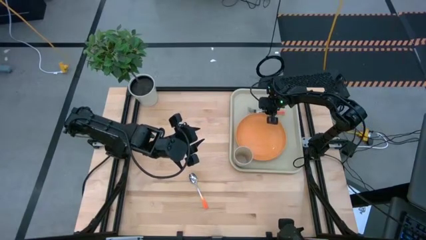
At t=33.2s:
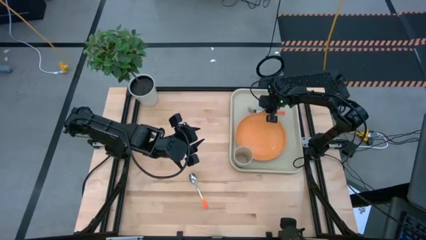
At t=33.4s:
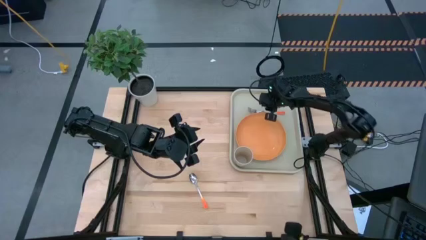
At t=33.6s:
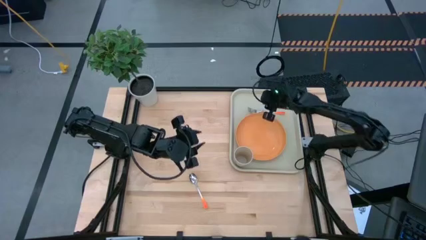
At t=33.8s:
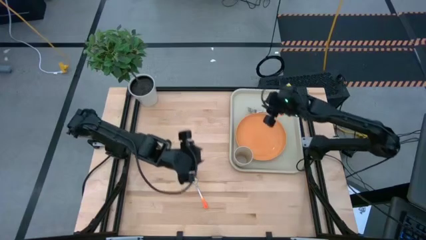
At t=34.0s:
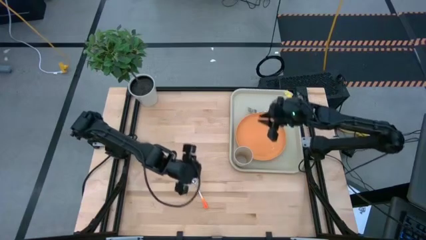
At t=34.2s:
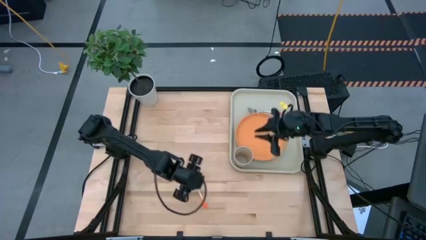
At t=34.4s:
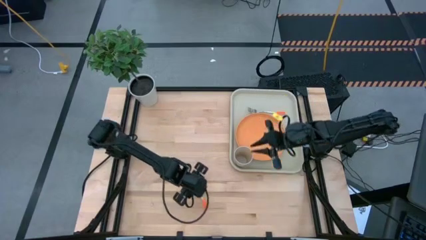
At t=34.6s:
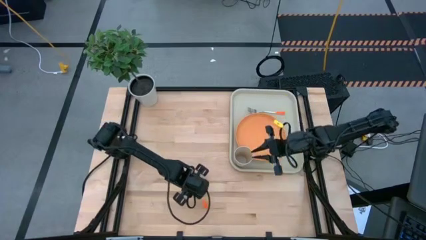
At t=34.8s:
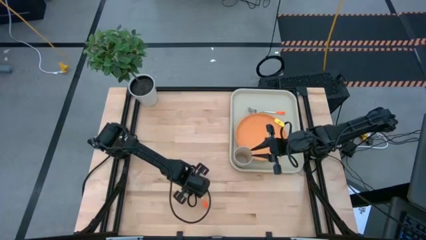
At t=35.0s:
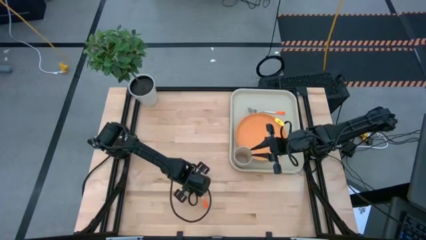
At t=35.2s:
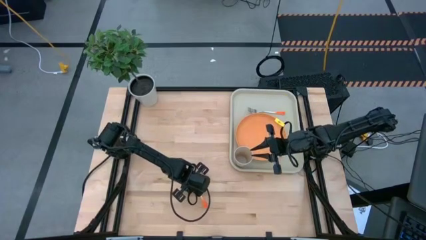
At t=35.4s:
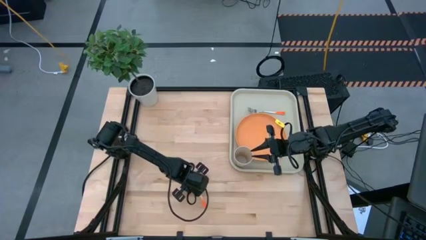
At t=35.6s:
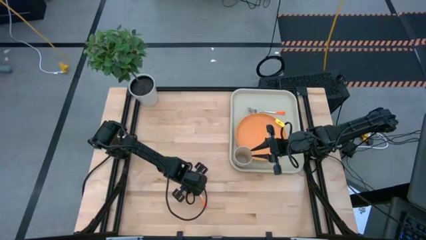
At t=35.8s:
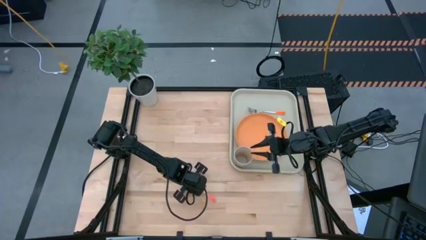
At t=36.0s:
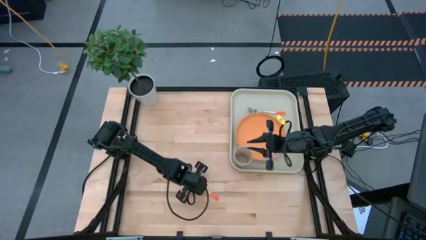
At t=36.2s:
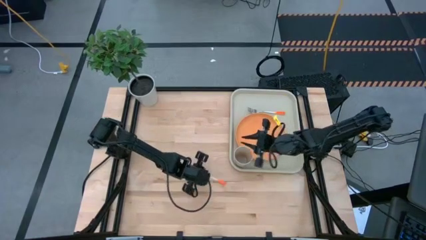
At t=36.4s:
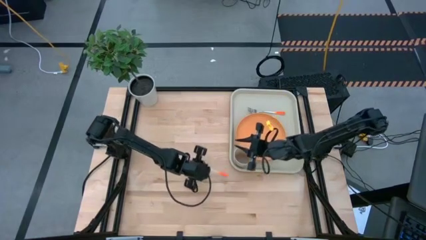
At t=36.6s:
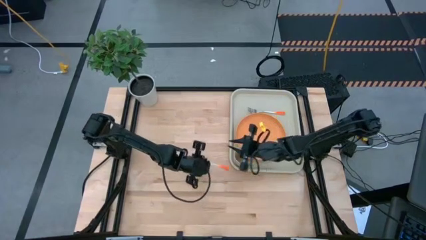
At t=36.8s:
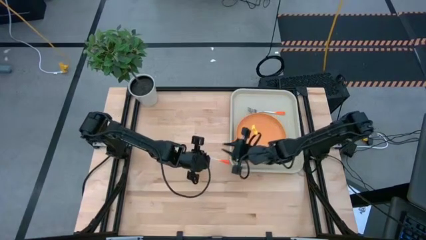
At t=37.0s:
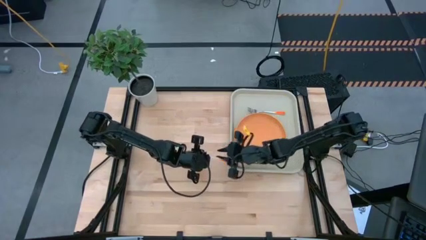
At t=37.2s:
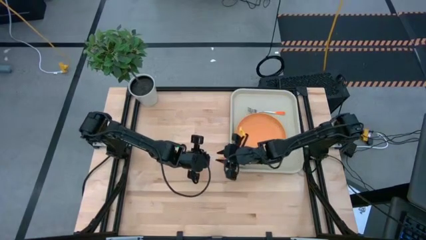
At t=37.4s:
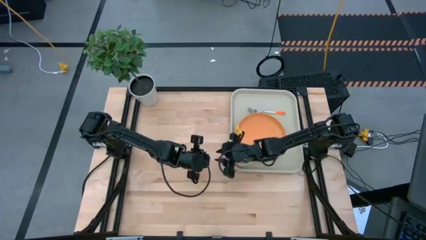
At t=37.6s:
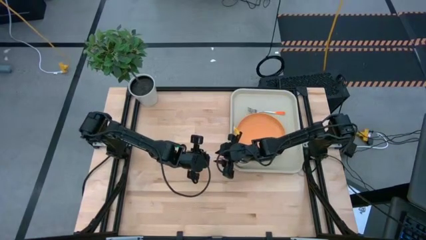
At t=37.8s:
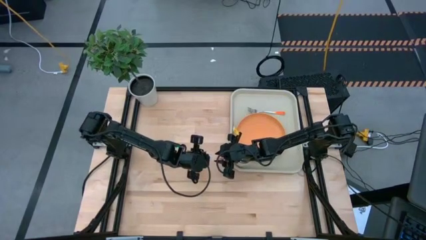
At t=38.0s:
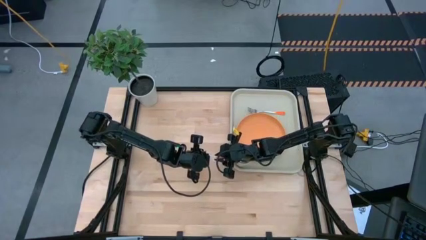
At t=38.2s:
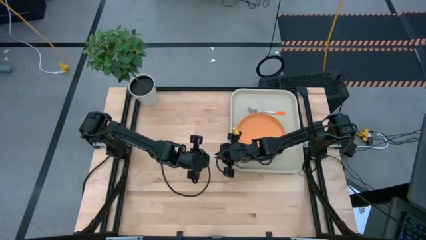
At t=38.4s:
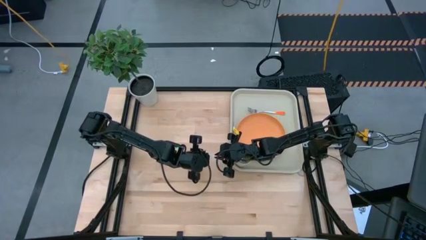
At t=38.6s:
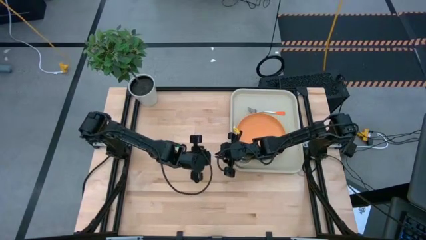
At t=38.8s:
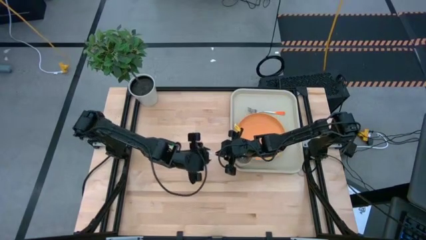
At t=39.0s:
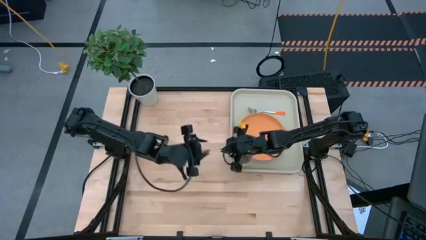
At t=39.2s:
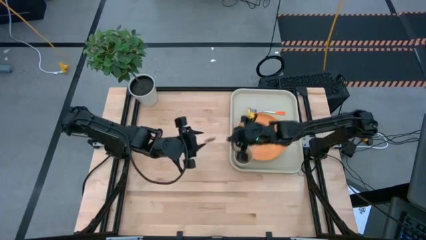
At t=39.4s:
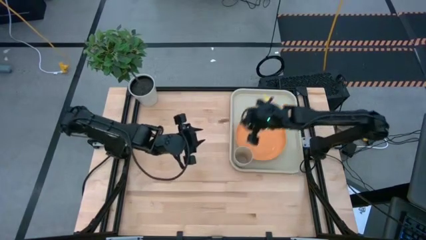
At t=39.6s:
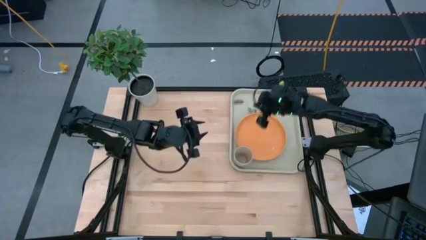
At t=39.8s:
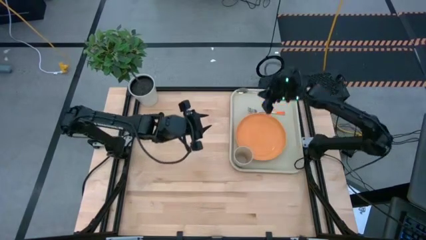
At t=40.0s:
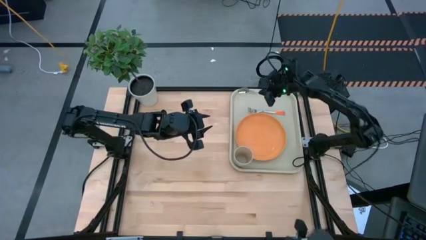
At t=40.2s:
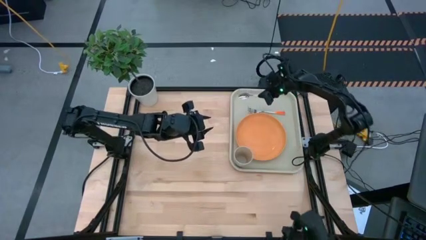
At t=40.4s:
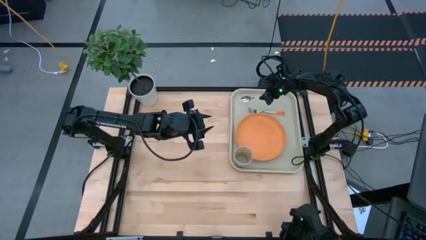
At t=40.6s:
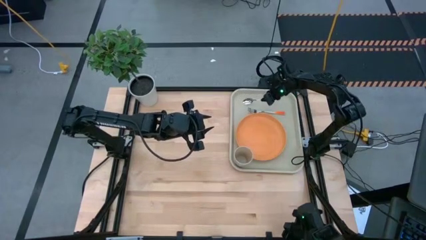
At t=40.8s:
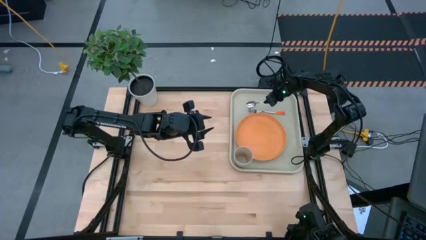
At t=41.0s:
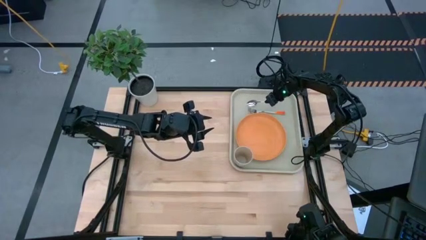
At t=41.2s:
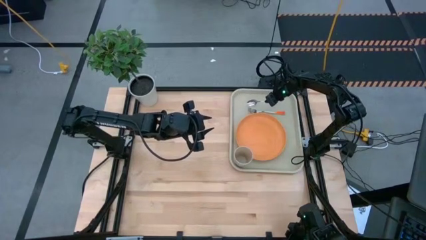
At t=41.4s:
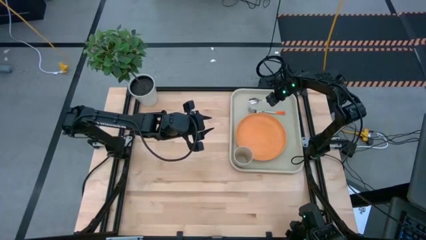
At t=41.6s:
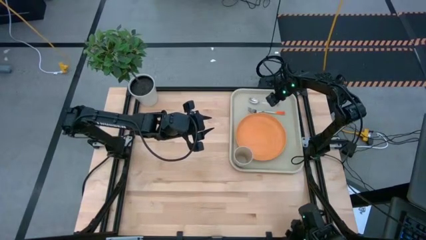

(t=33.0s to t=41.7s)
Task: Pick and place plate/cup/fork/spoon on tray
Put the orange spoon on the gray tray to the top of the orange fork
